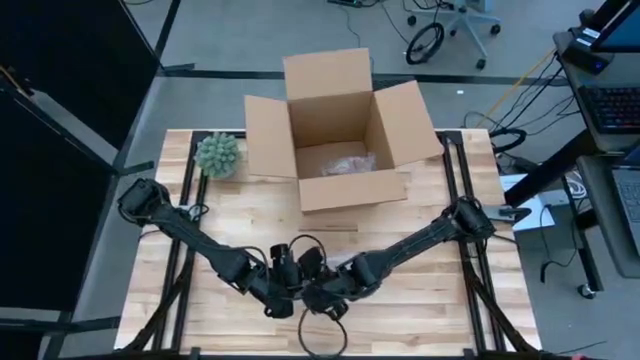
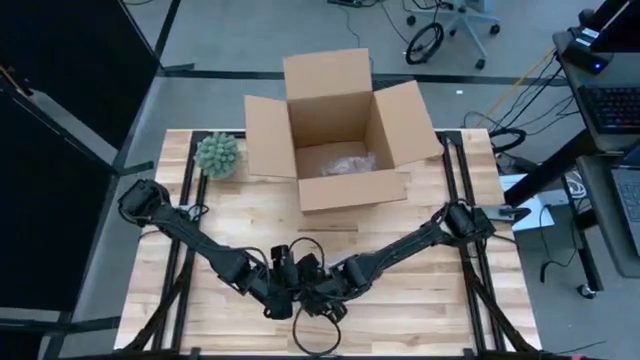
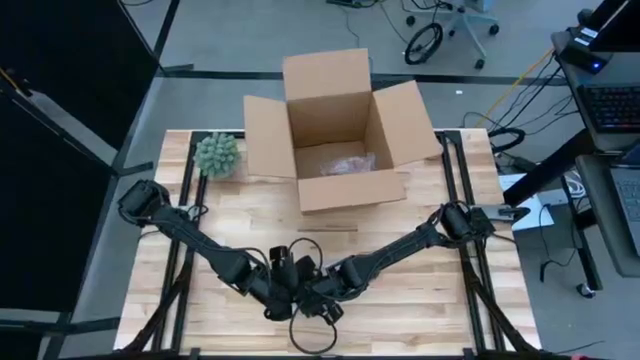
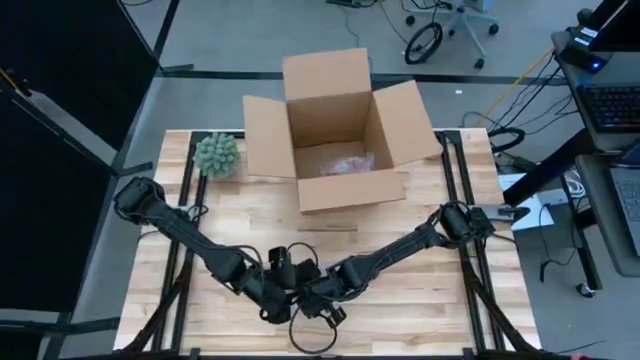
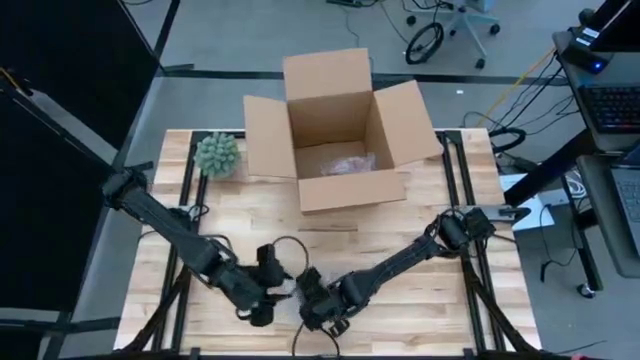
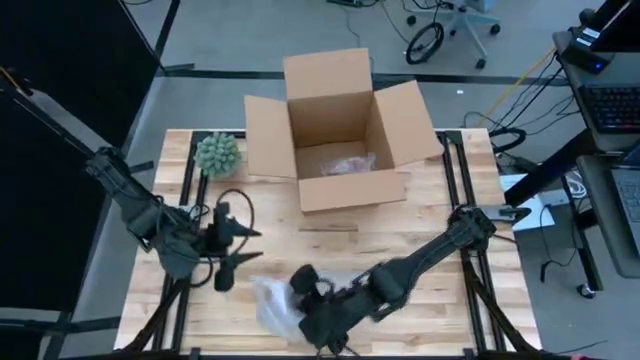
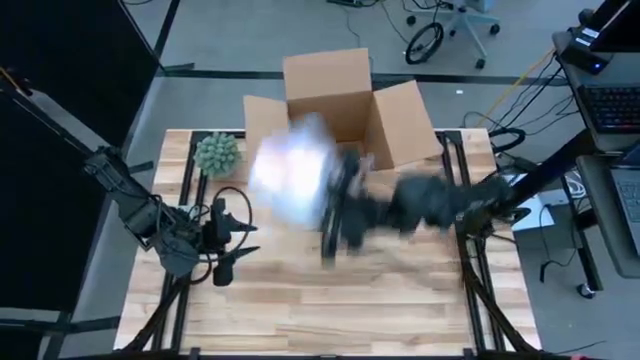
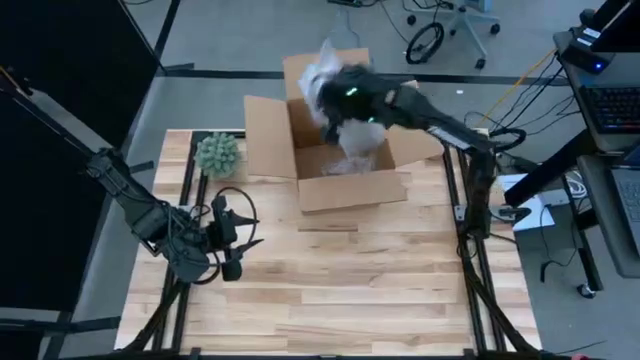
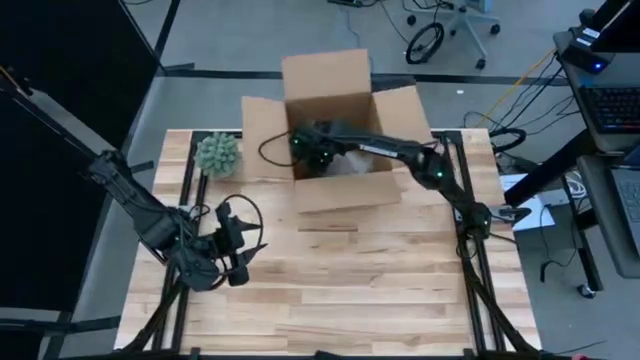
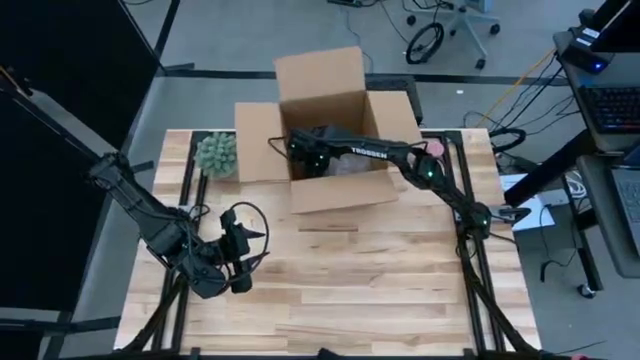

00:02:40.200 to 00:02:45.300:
Task: wrap mug
Put the pink wrapped mug into the box

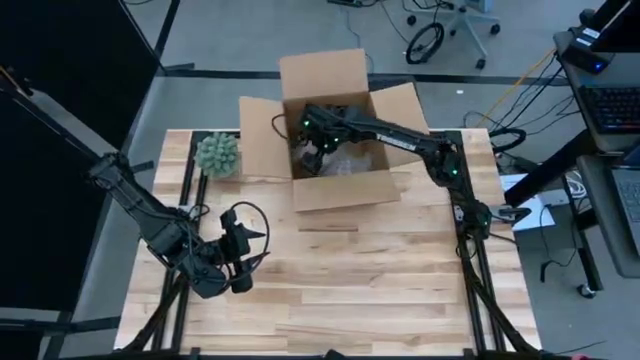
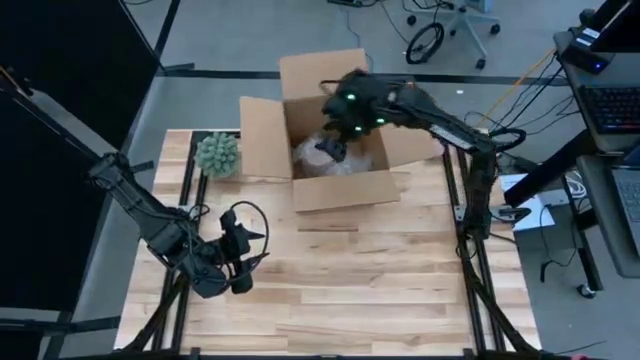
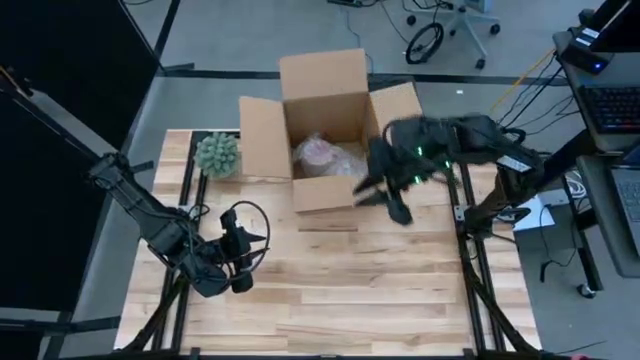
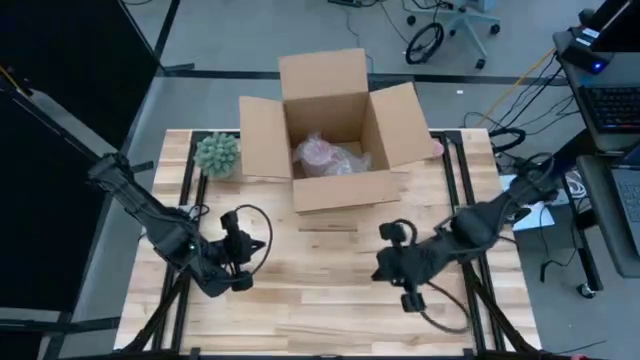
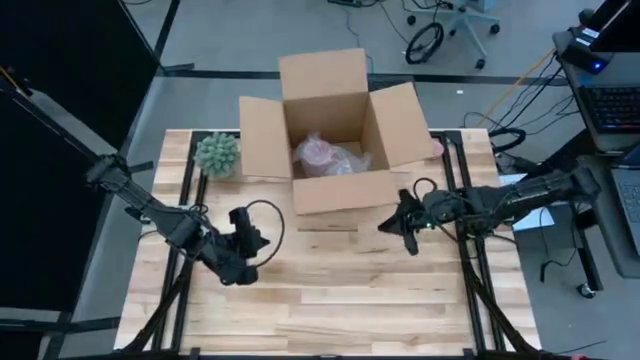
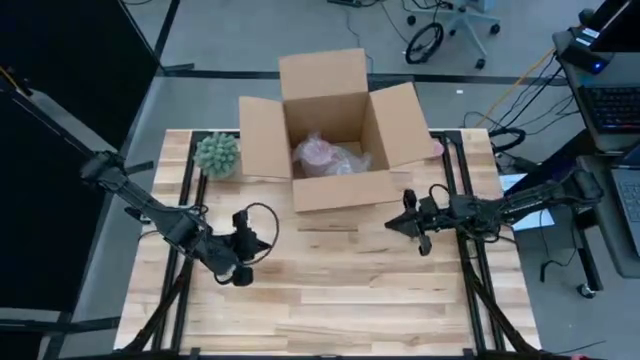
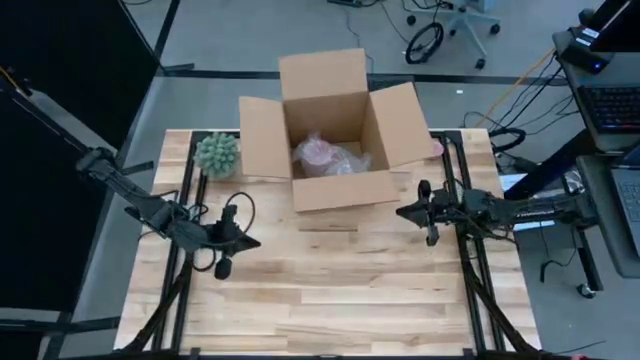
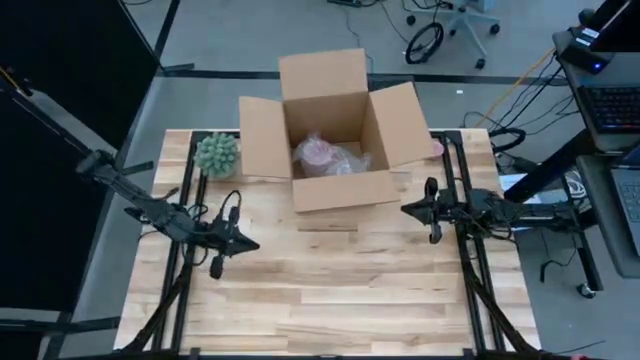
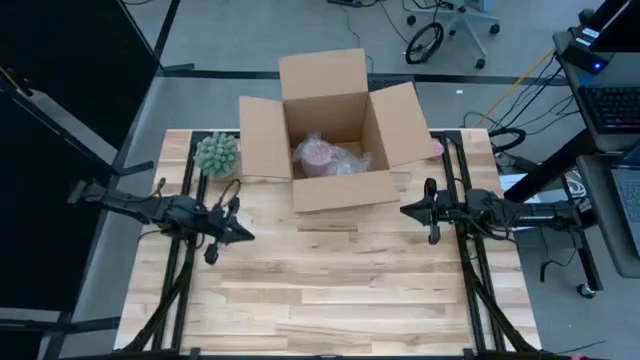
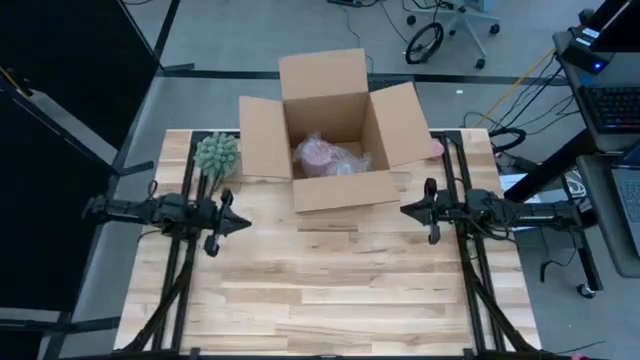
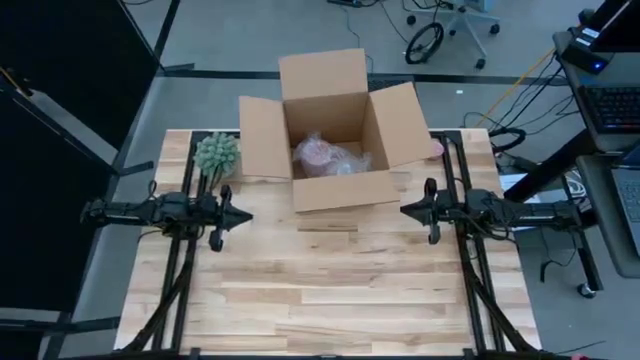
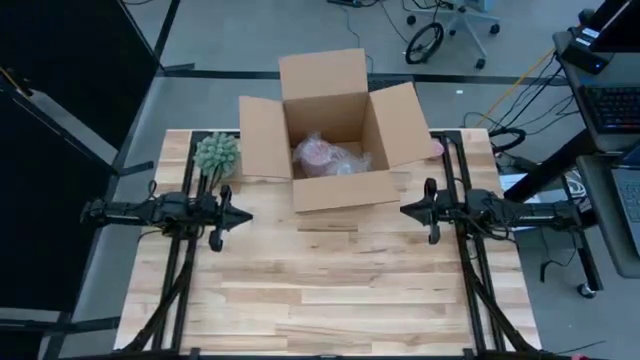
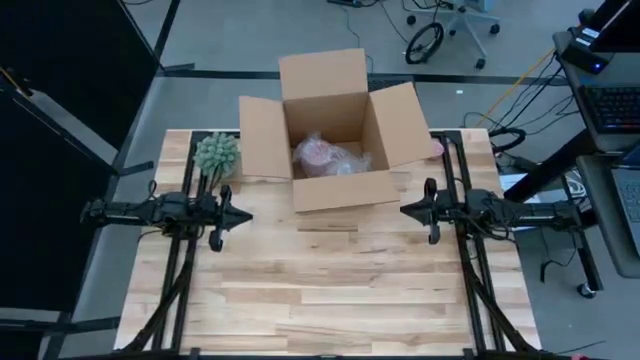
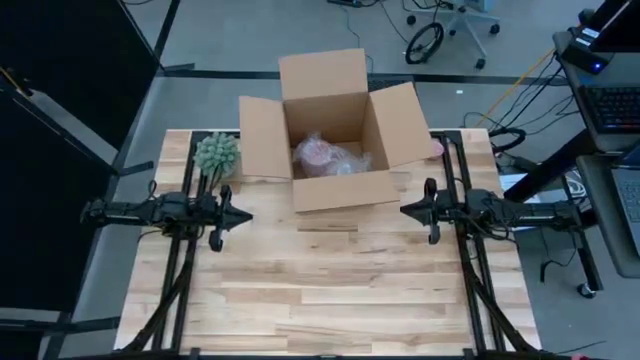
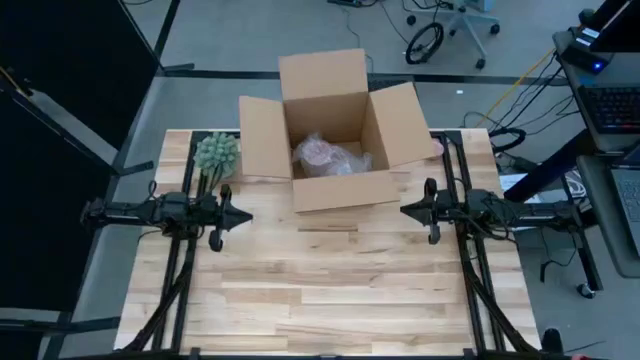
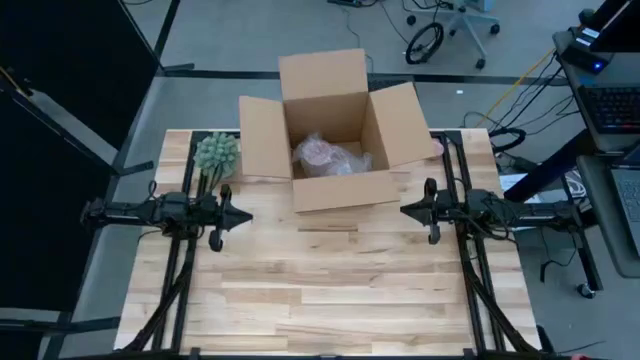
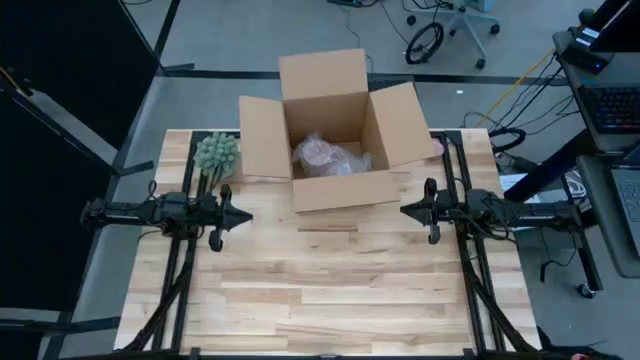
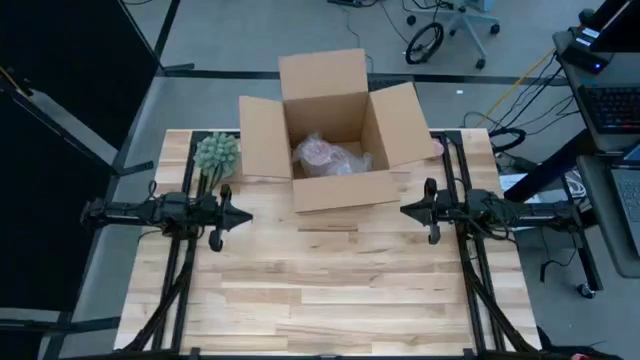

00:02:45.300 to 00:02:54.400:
Return to Home Position

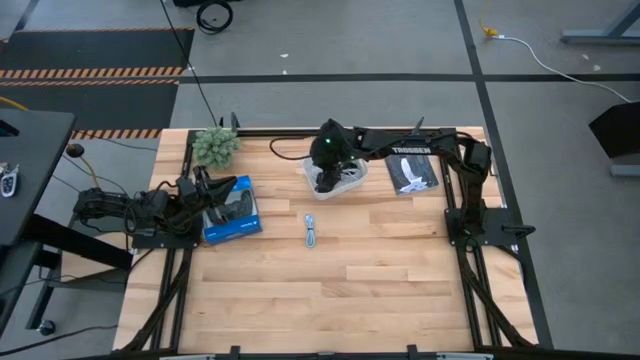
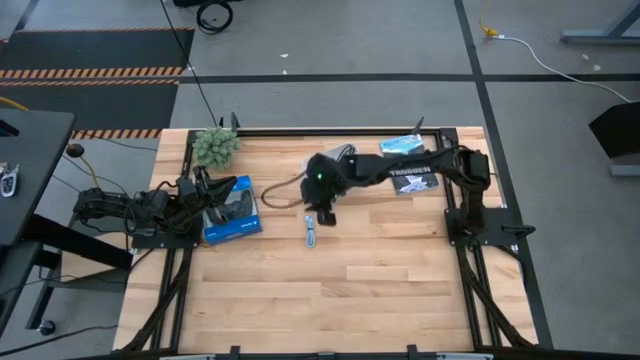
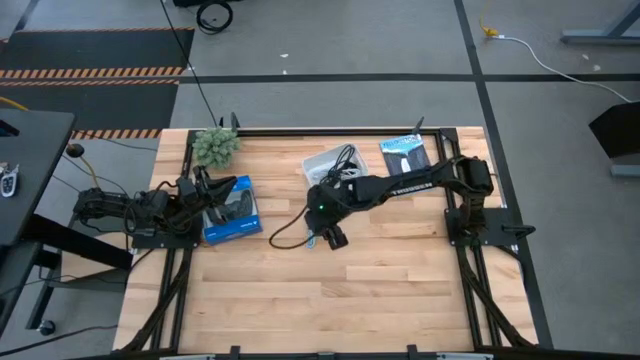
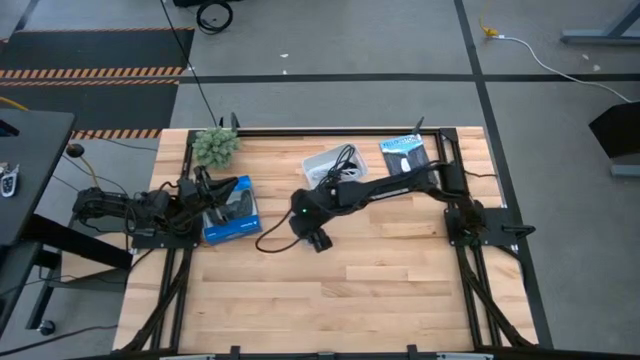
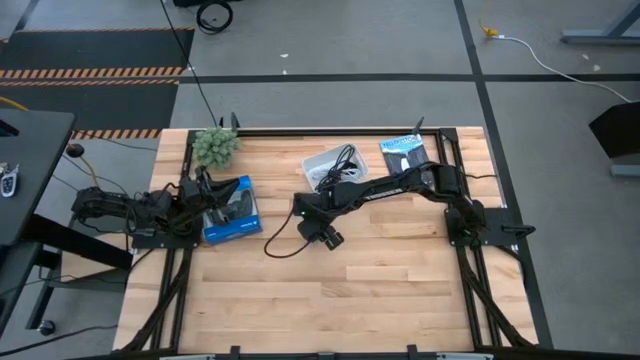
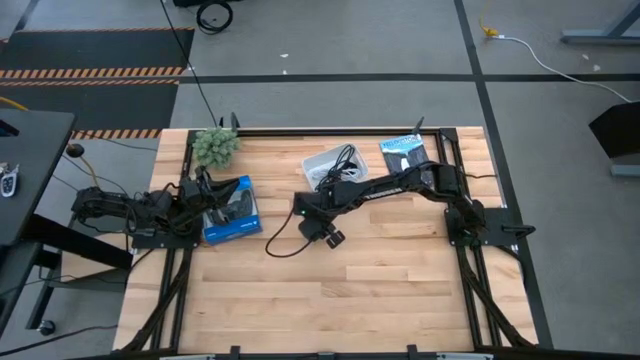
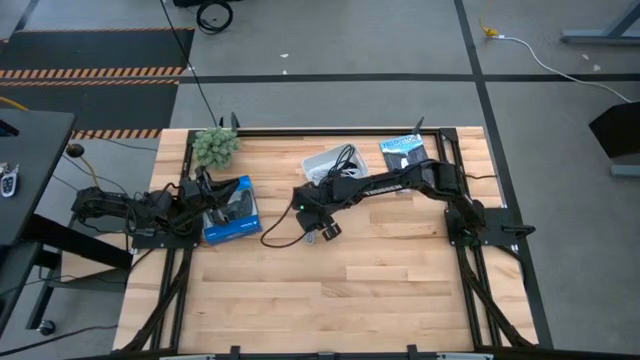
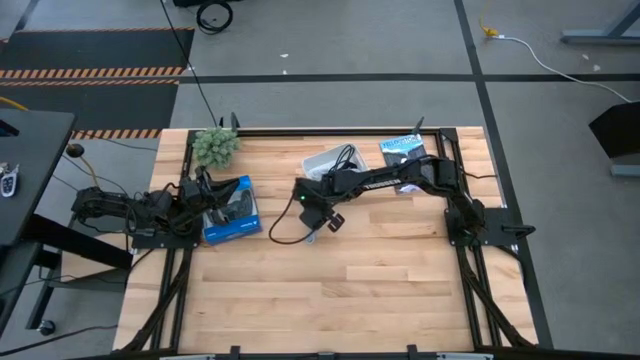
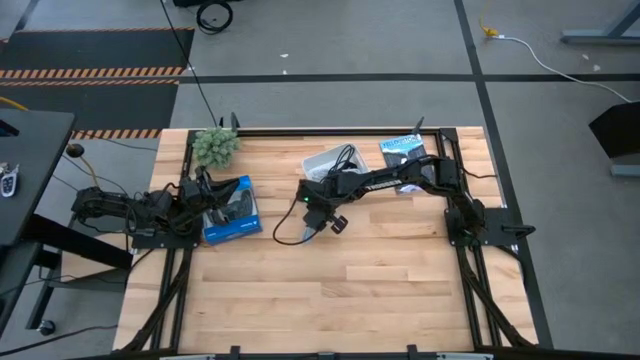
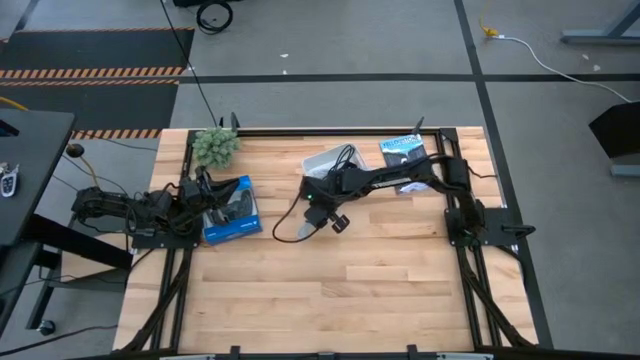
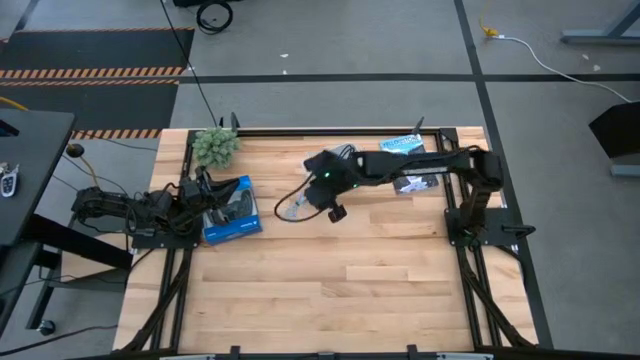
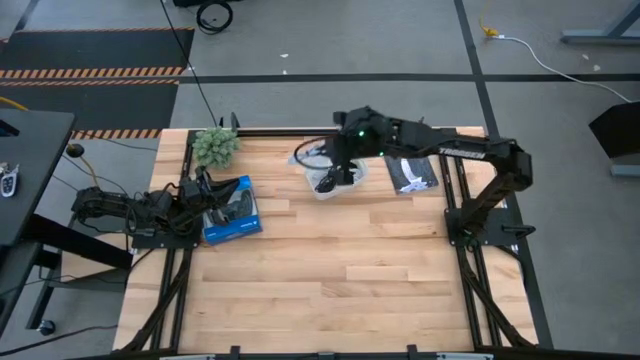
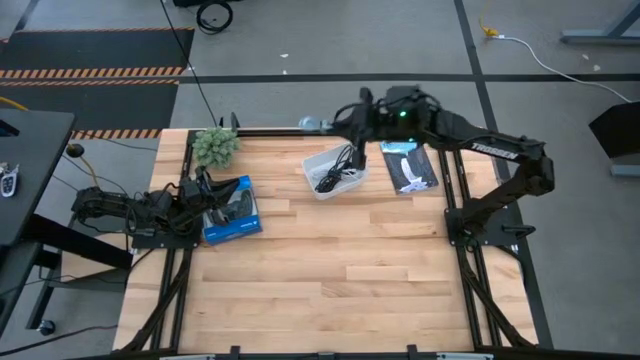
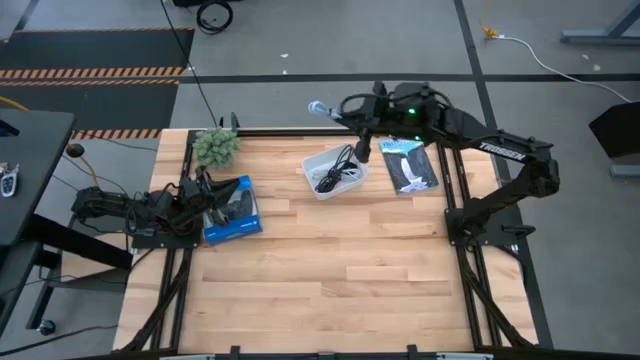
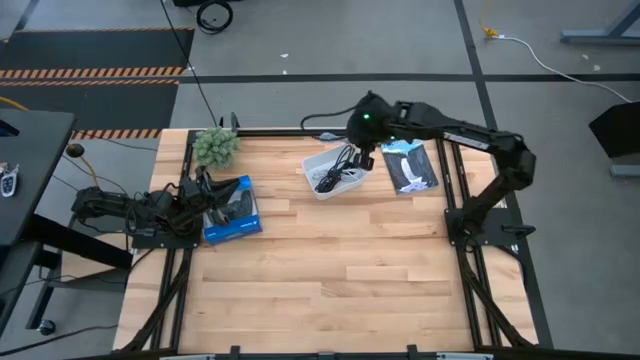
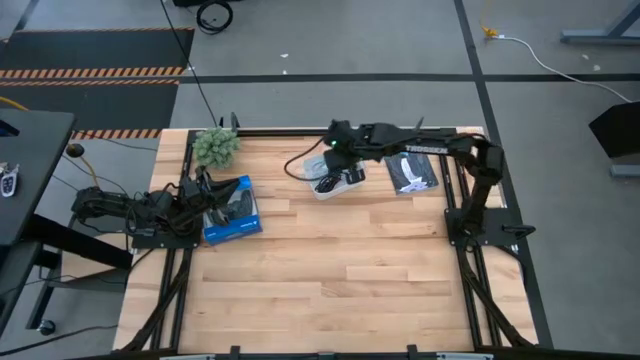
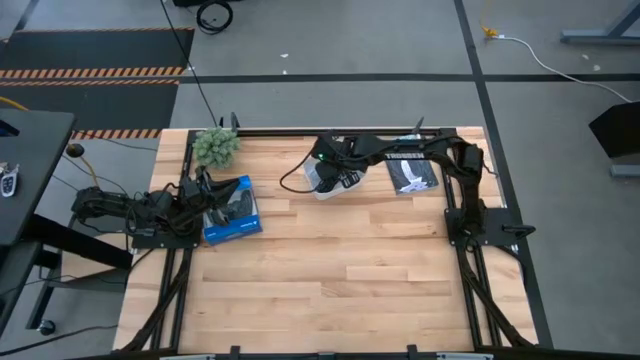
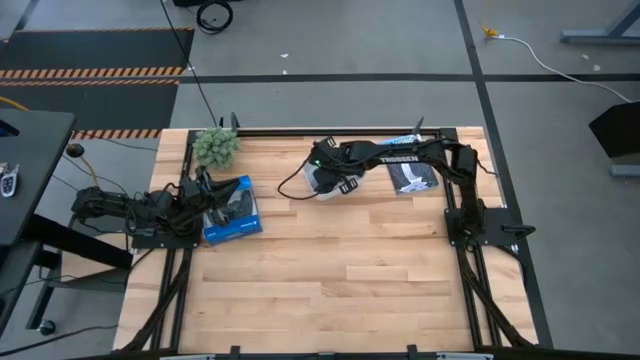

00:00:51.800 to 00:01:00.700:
Task: Pick and place USB-C Cables
Put the light blue USB cable into the white bin
